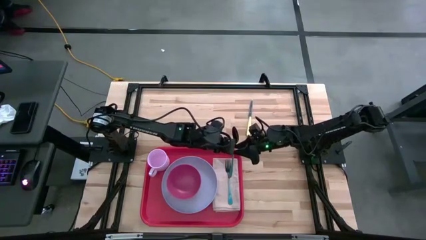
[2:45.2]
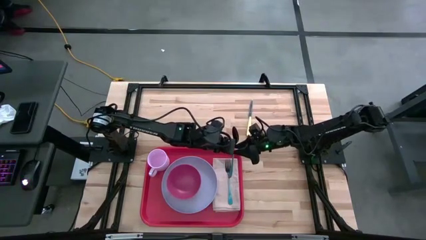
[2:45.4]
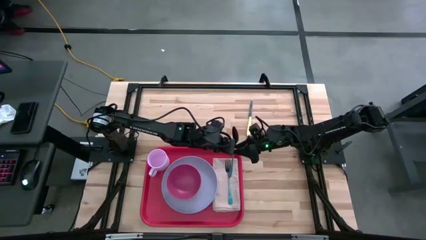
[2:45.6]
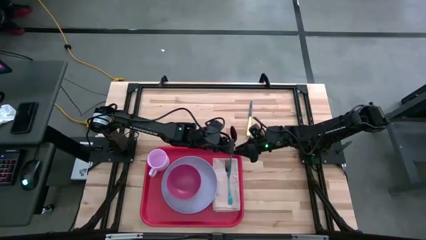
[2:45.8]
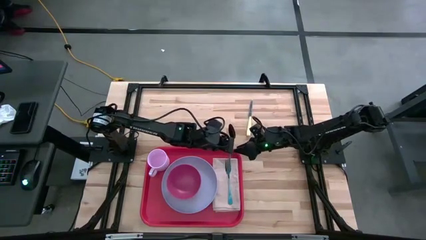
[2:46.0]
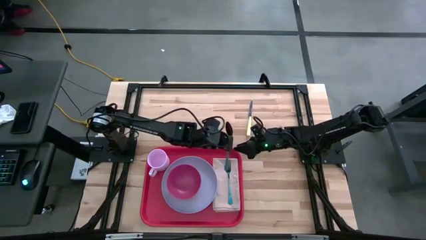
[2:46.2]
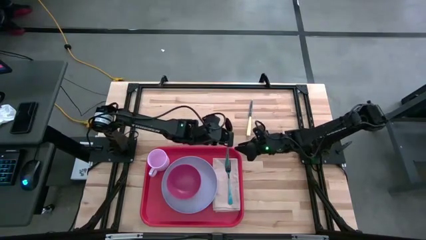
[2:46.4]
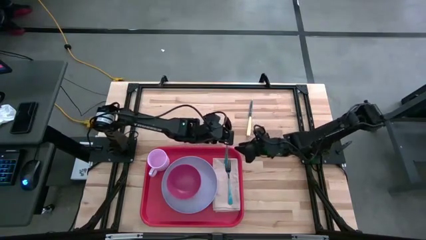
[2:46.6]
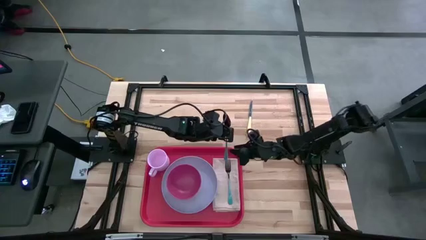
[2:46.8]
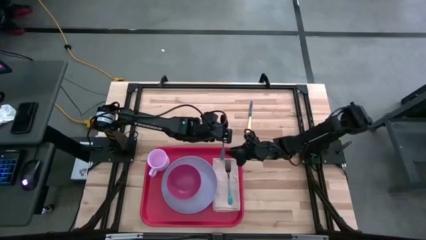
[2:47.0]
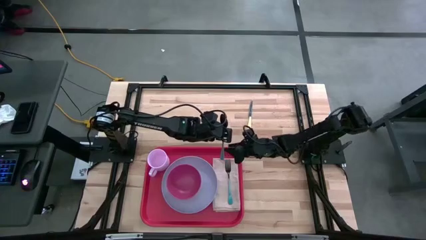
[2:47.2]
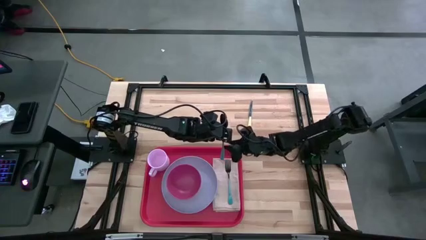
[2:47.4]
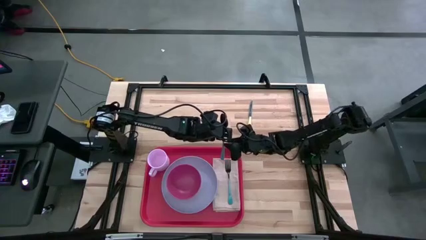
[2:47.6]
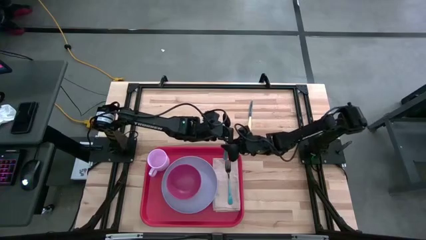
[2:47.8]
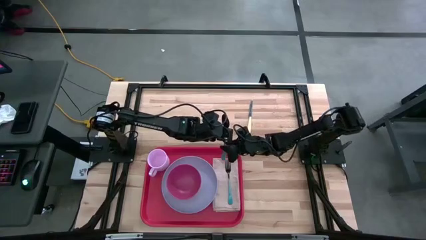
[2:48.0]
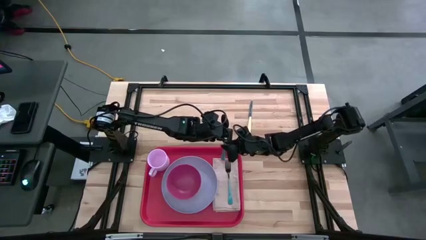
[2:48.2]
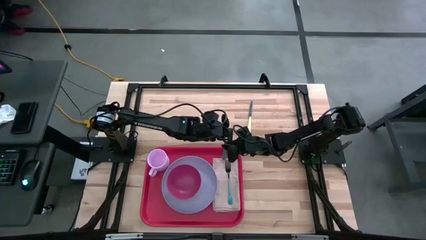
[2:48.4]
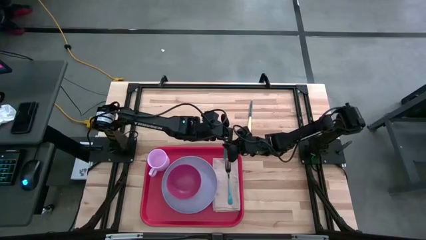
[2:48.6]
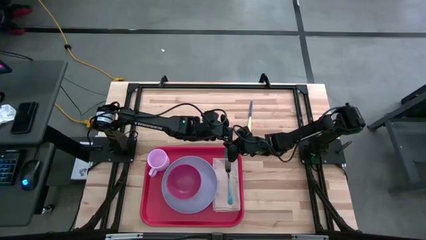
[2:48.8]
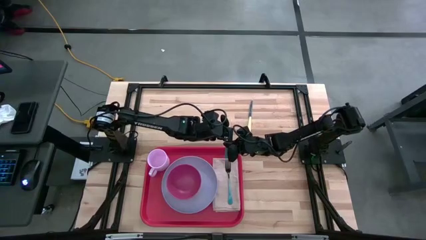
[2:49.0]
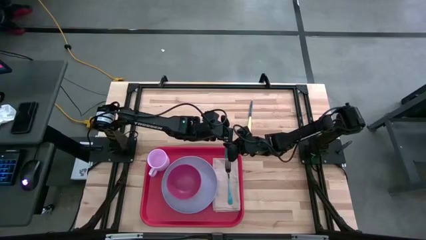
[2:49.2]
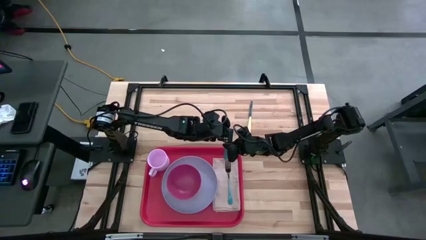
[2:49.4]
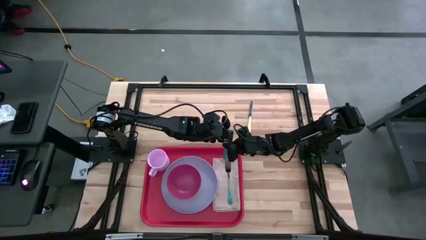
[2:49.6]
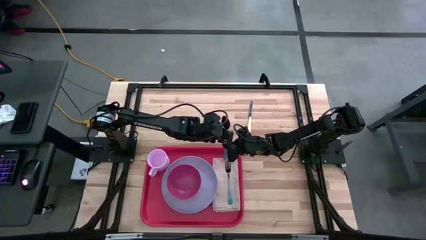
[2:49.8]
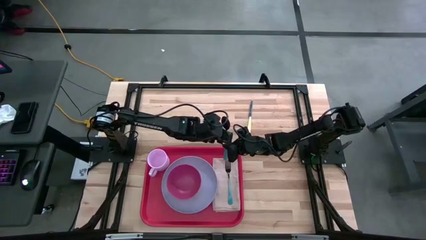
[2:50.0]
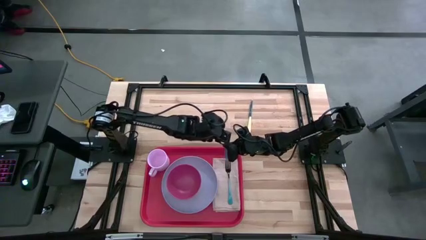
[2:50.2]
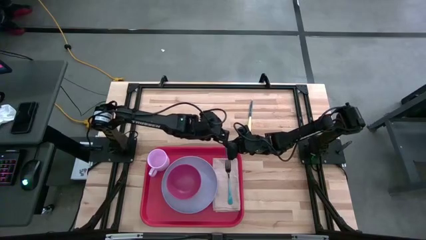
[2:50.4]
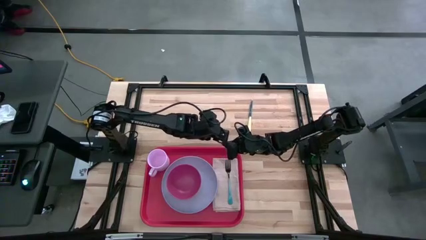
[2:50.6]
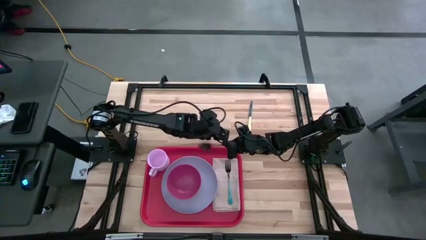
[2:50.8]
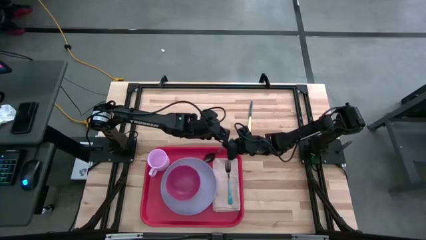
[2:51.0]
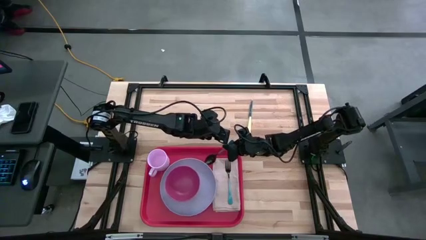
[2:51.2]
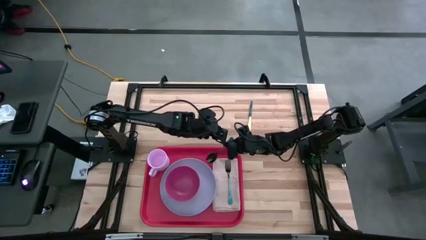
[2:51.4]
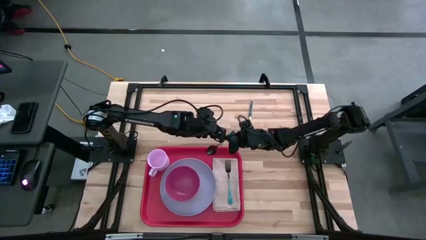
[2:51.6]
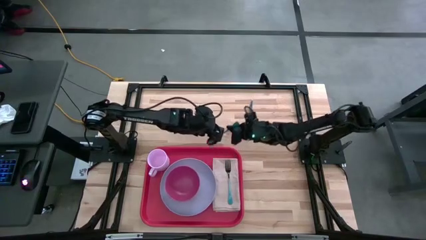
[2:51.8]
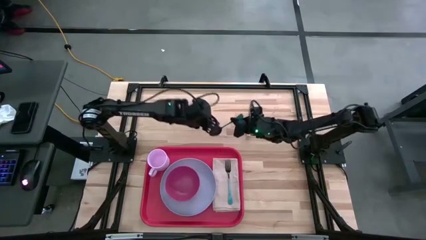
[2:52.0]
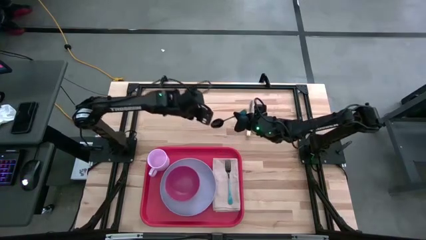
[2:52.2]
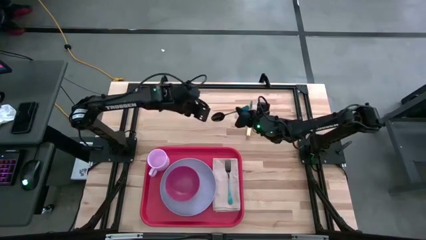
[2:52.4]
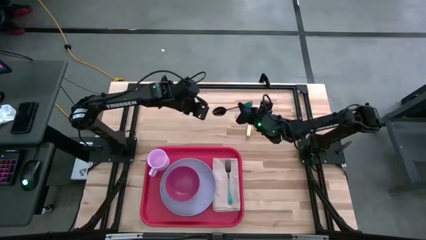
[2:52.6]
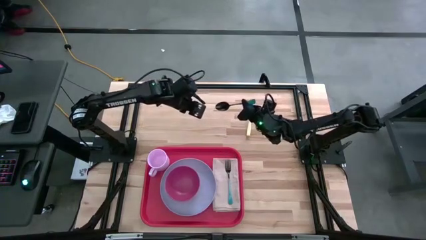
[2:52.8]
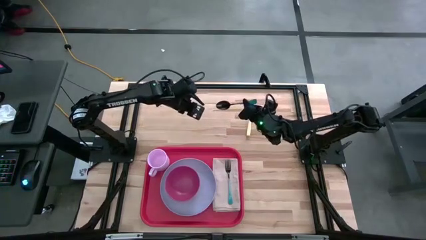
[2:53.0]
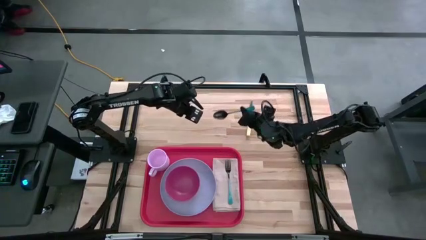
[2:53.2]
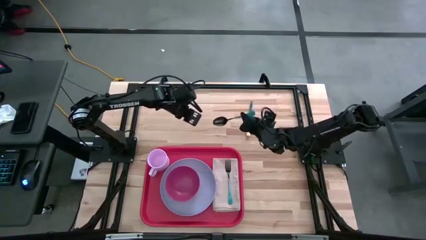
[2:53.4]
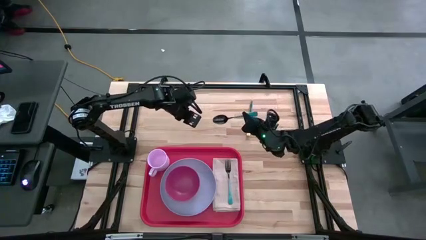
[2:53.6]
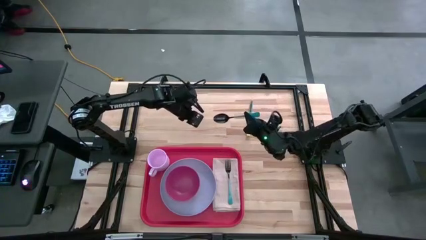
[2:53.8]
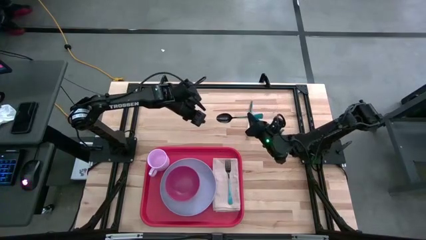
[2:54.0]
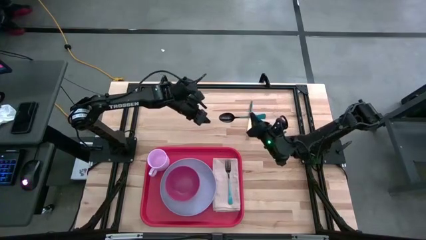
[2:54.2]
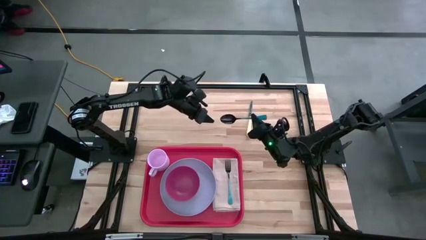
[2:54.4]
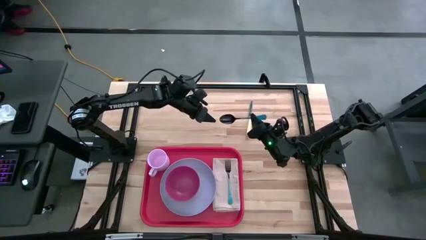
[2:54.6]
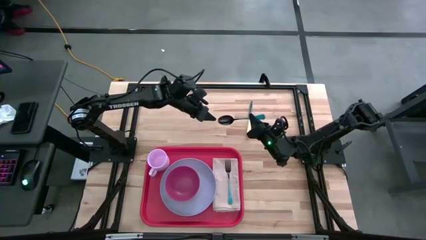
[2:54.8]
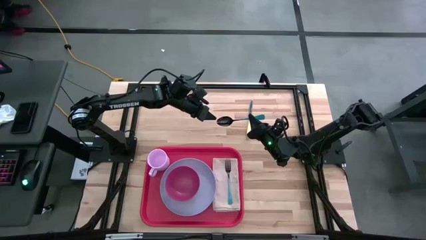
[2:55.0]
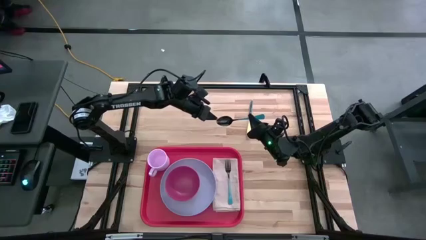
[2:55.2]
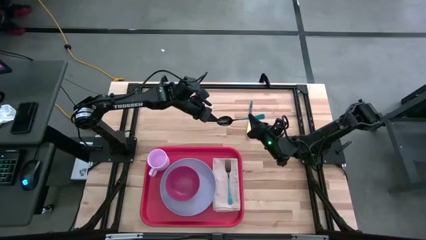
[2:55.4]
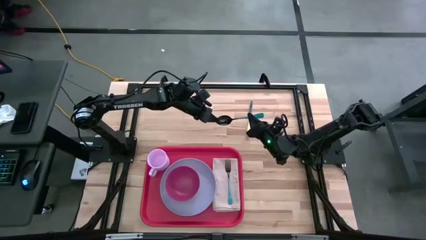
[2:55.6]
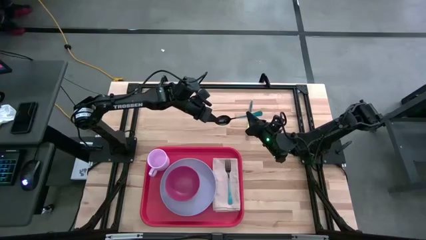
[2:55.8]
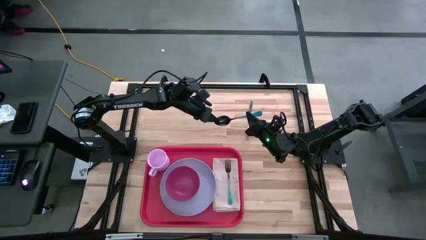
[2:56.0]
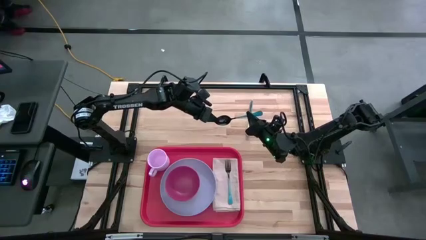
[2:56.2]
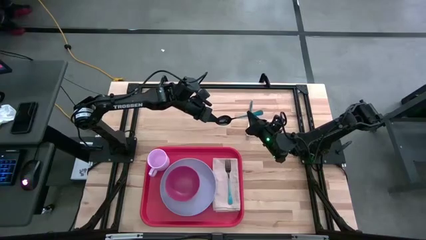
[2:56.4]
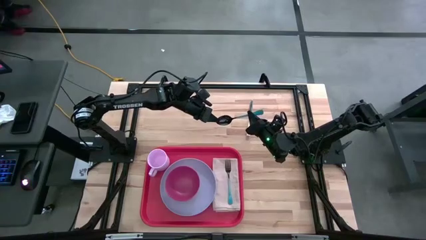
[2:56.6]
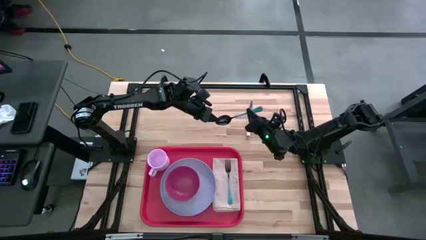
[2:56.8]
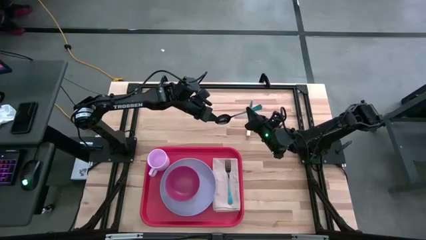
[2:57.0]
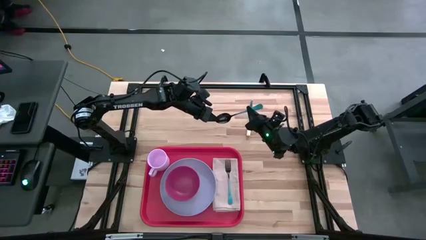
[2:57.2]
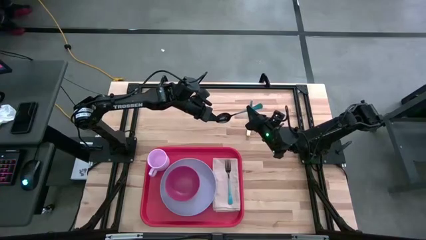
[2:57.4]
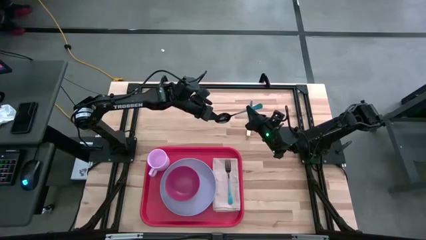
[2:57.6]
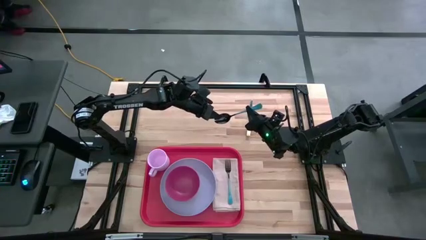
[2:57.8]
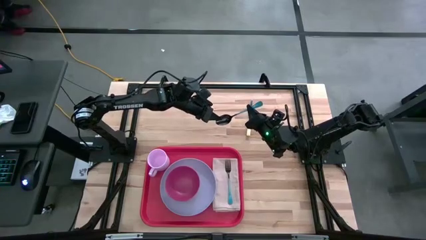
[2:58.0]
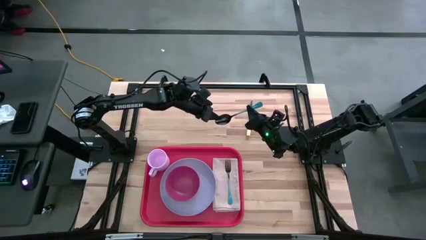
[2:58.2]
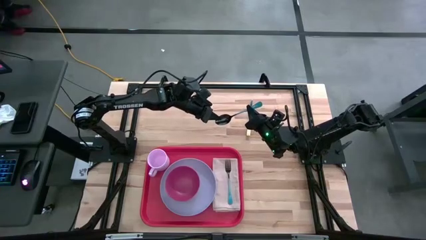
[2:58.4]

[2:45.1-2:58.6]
Task: Set up tray
Put the blue spoon beside the blue plate on the peach napkin
